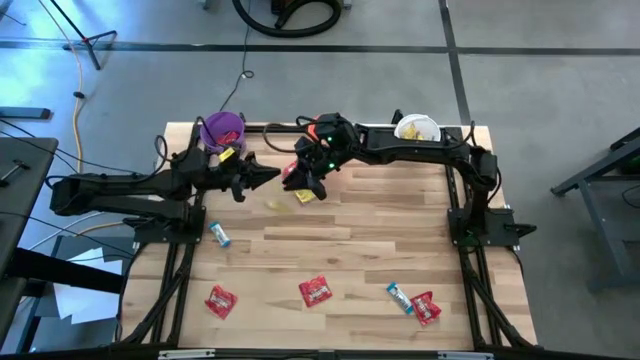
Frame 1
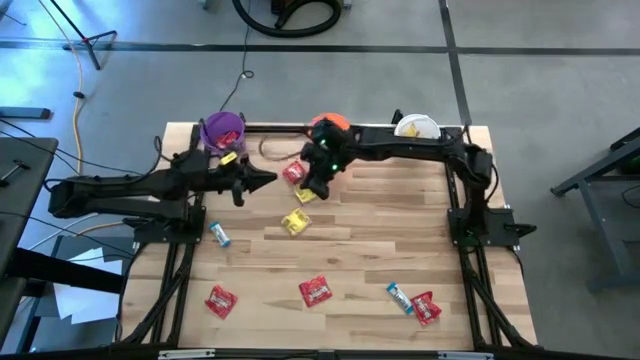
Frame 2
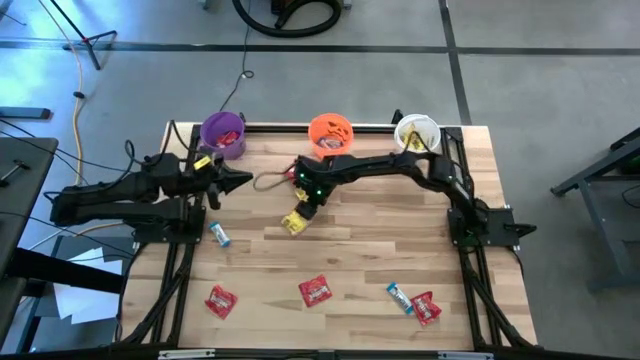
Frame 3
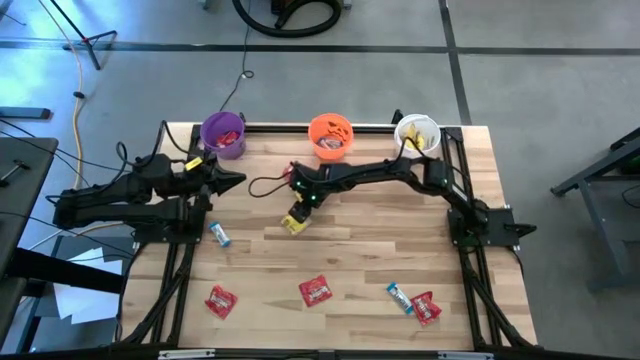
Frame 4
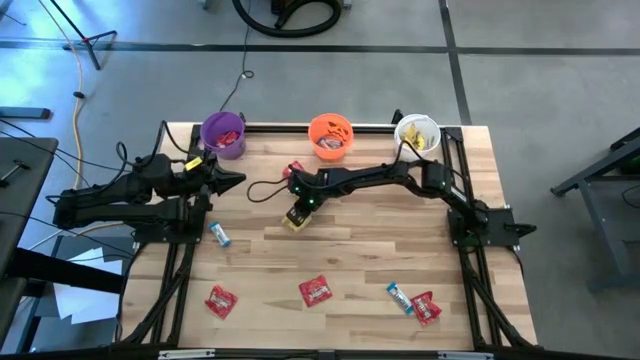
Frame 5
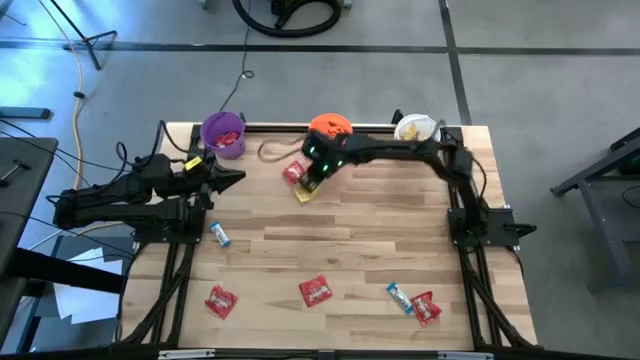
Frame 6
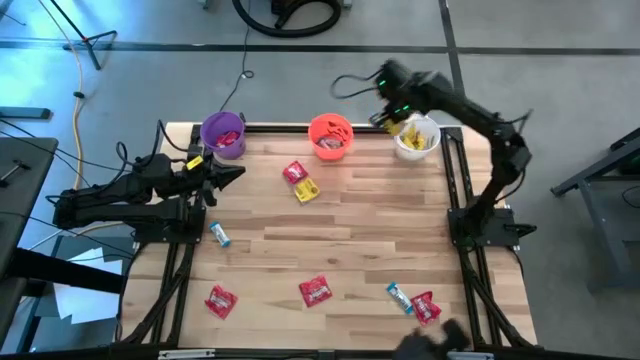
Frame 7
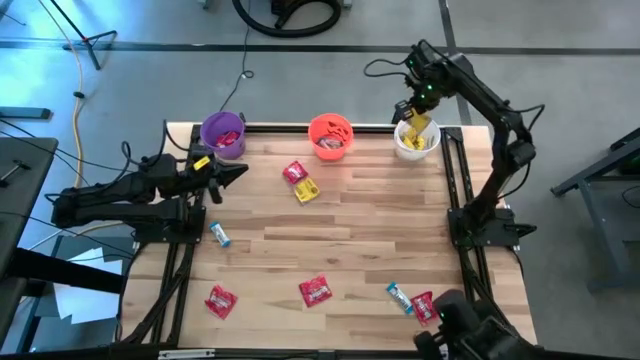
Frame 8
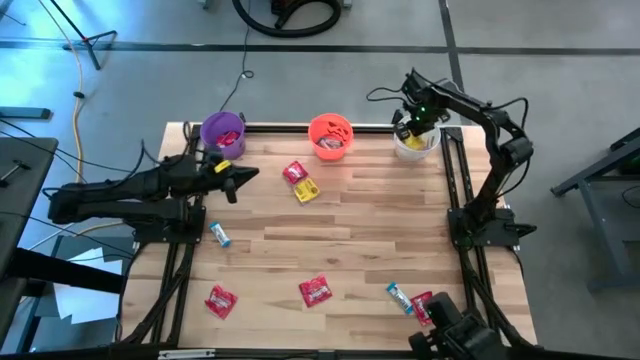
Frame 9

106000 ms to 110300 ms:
Task: Organize candy in baskets
Put the yellow candy into the white bucket

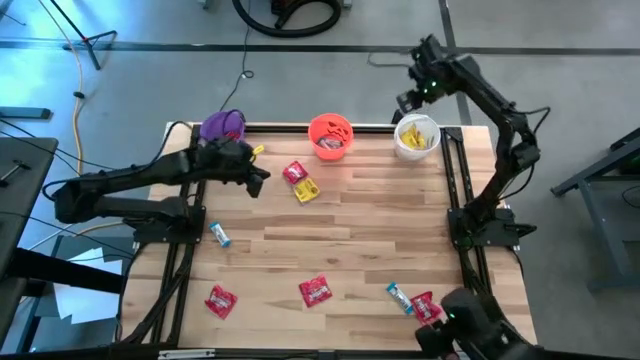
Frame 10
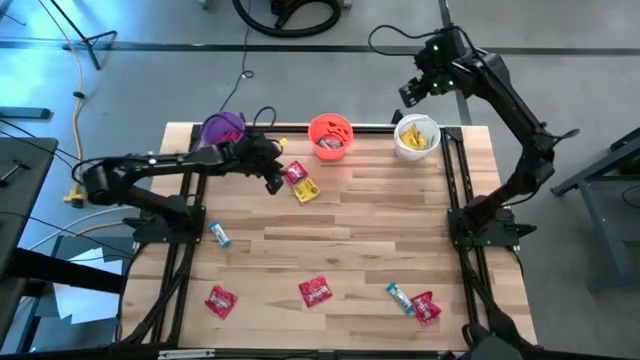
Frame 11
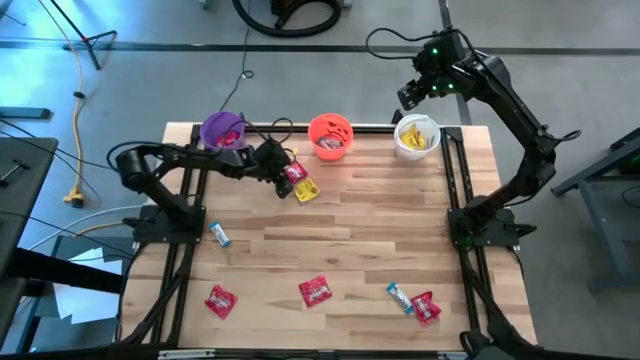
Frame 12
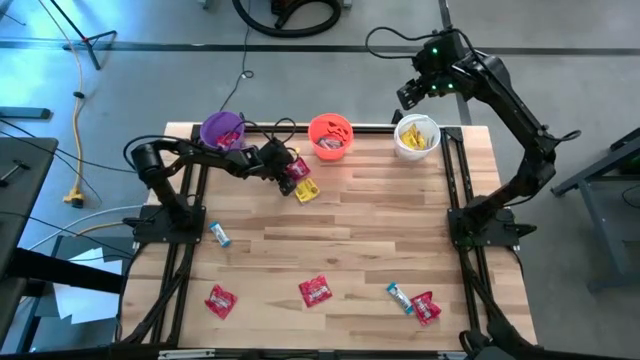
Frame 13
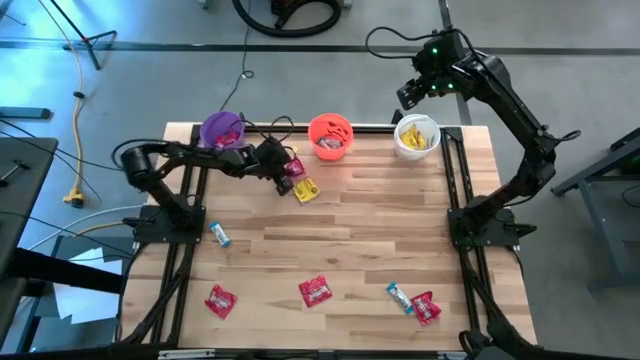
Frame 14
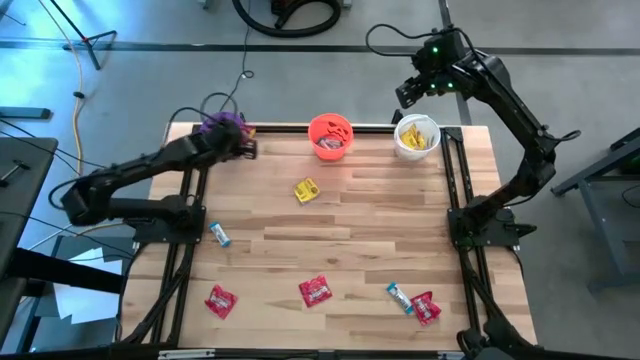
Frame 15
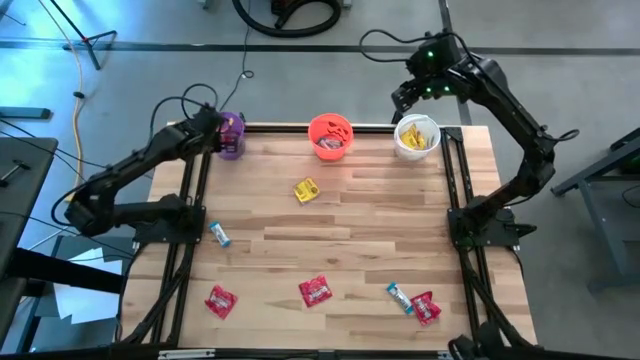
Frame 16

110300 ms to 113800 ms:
Put the red candy into the violet bucket

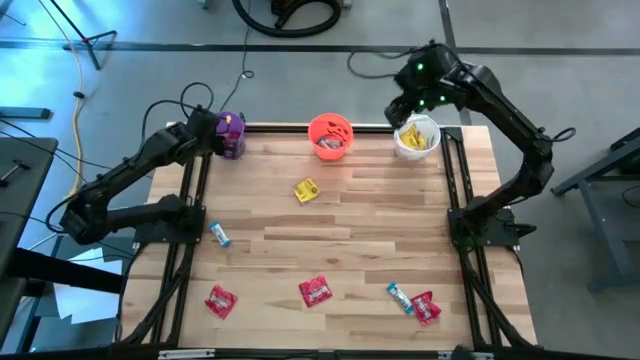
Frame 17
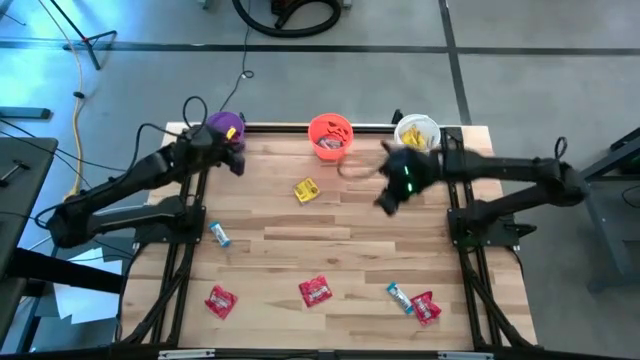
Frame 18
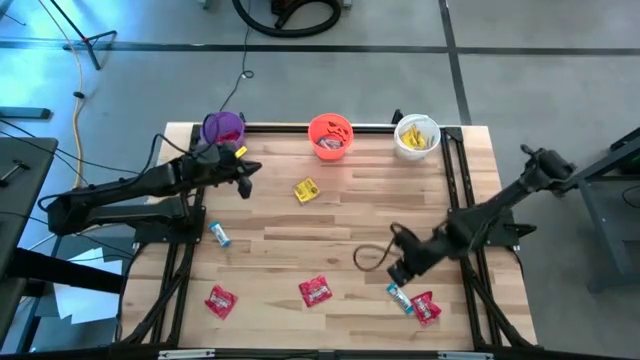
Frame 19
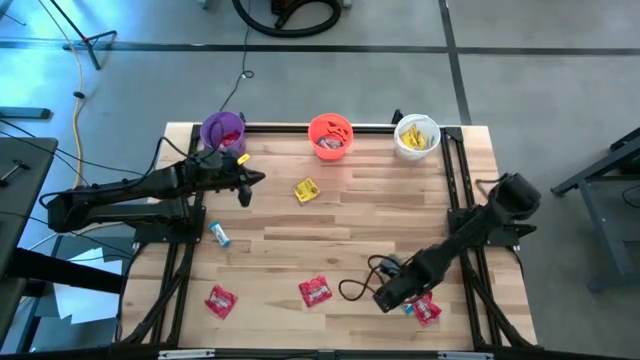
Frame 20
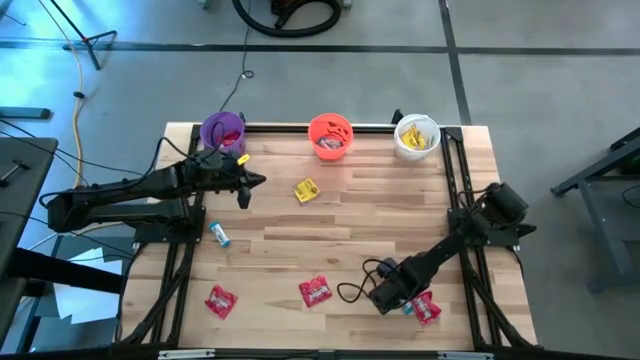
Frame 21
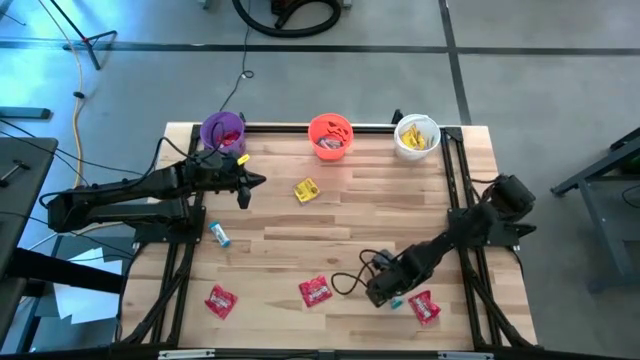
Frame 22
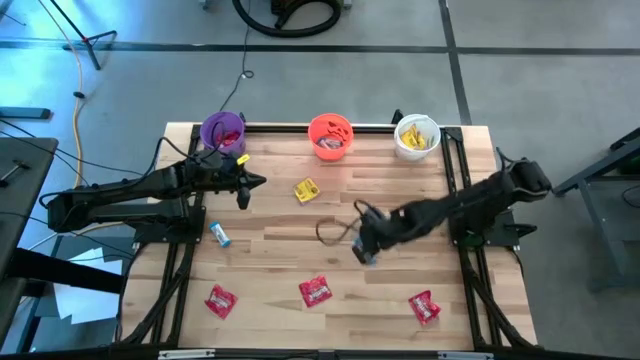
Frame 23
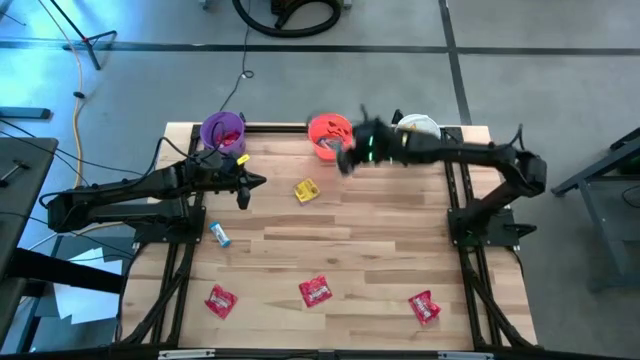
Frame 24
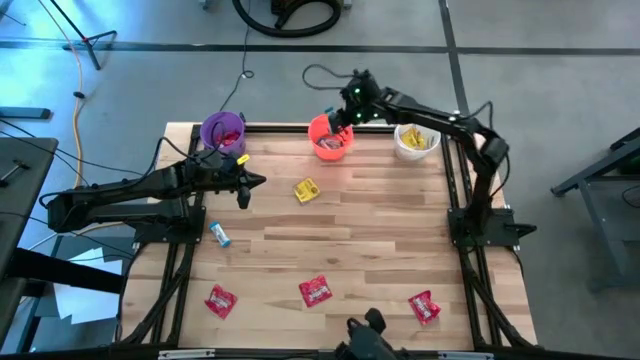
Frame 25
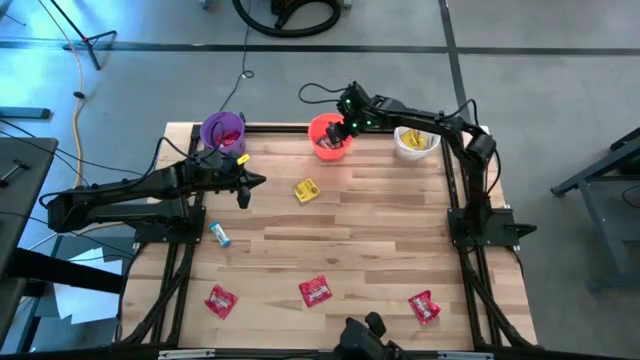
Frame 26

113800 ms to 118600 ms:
Put the white chocolate into the orange bucket

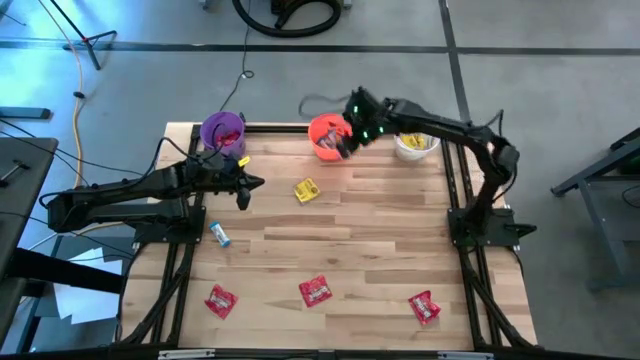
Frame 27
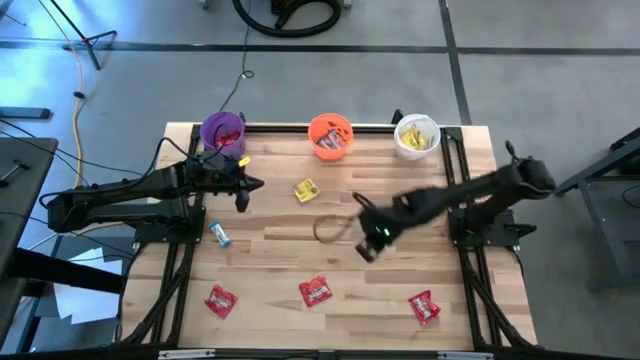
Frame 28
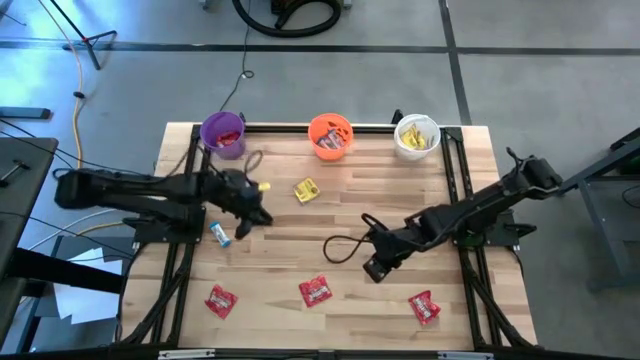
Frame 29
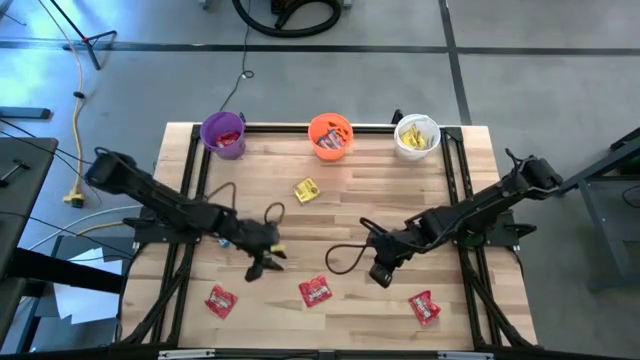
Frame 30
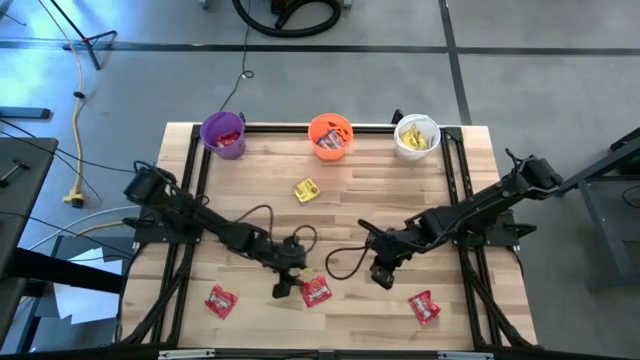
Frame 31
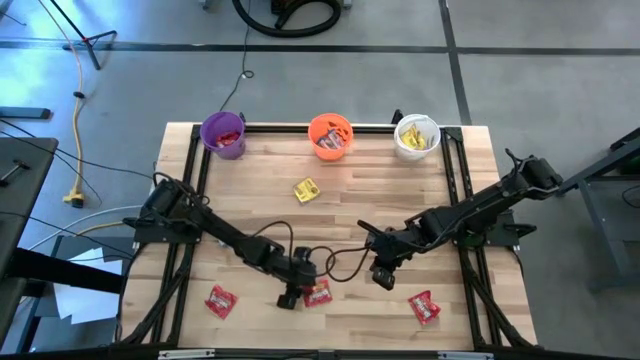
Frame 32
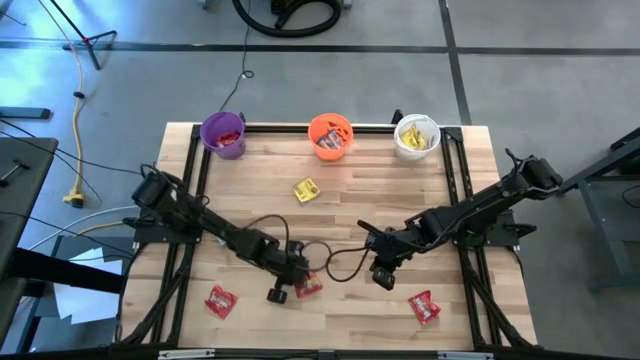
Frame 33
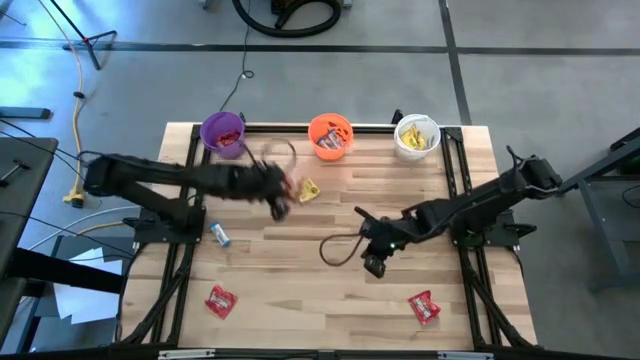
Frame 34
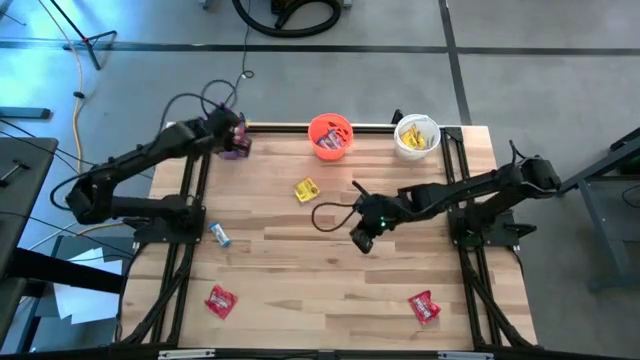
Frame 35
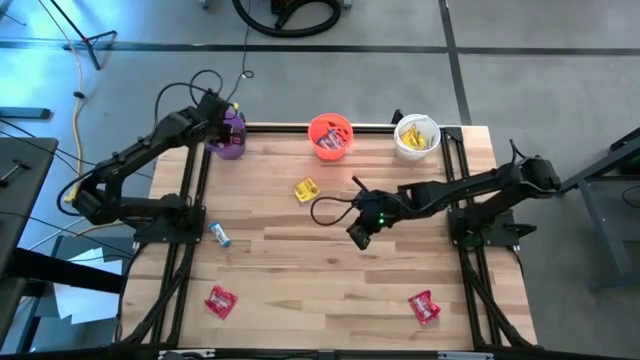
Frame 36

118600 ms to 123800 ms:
Put the red candy into the violet bucket

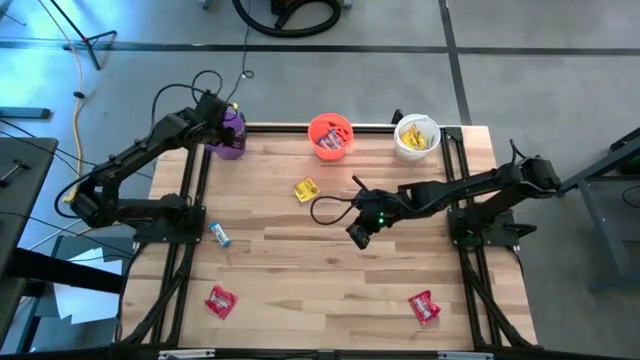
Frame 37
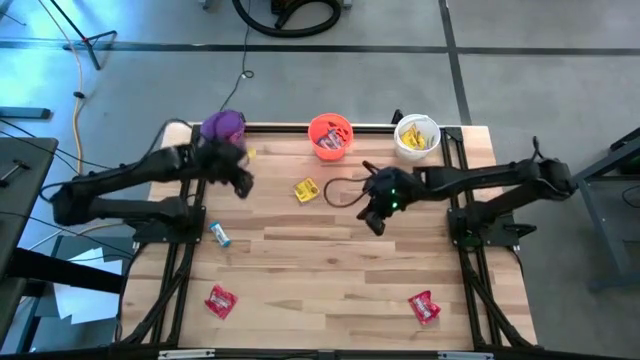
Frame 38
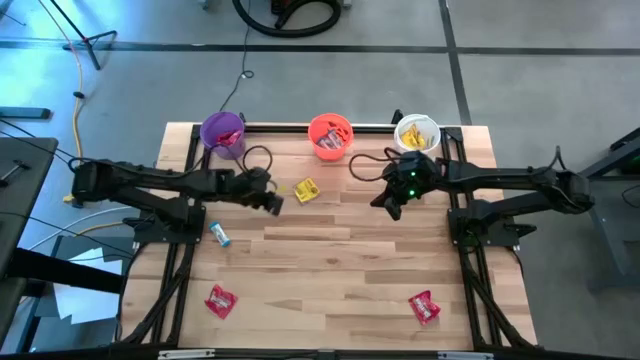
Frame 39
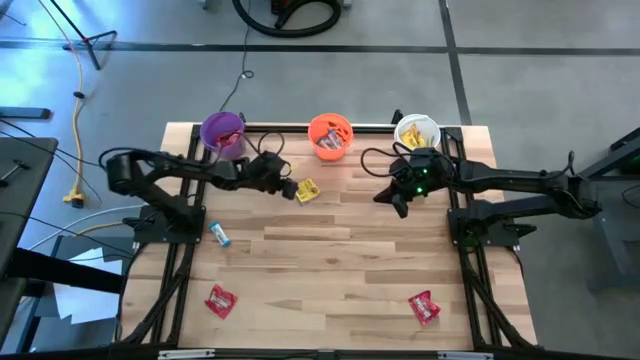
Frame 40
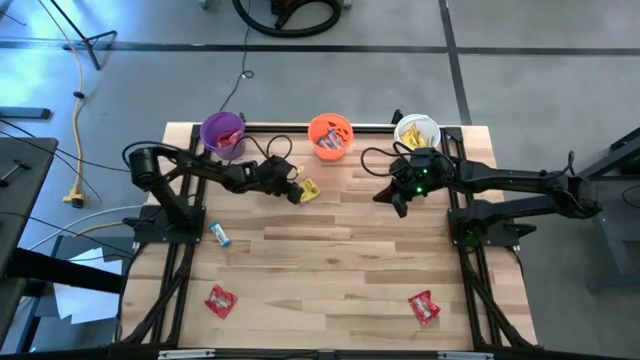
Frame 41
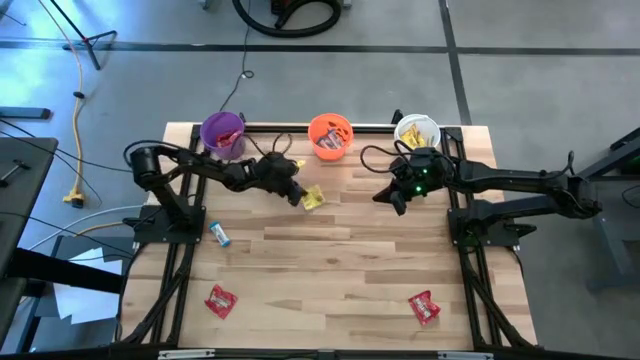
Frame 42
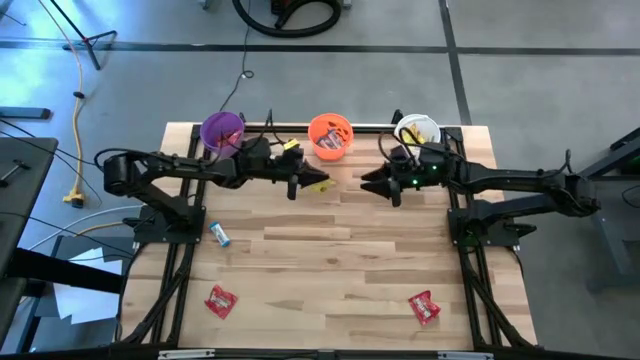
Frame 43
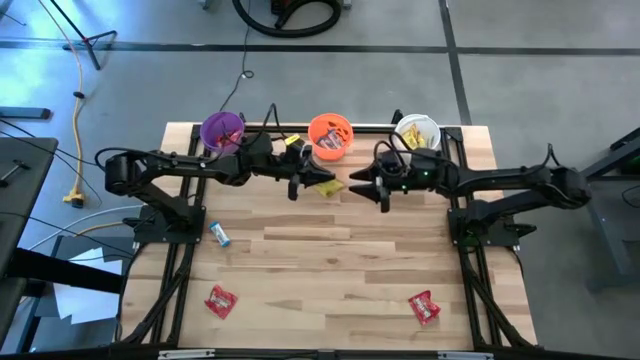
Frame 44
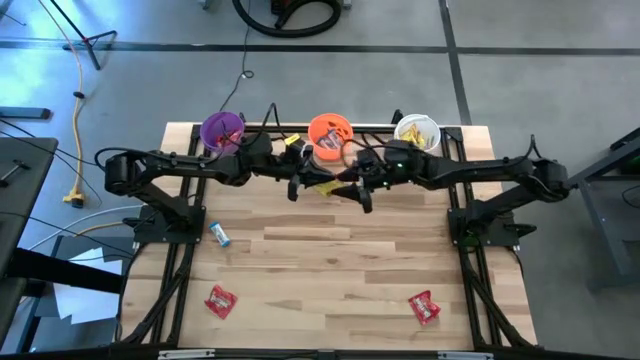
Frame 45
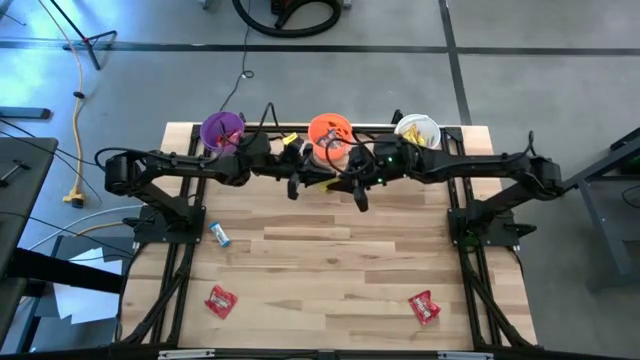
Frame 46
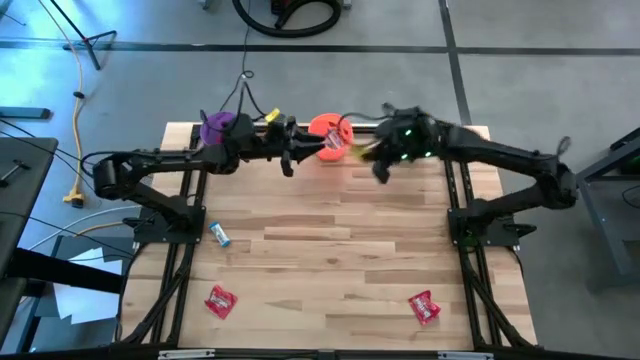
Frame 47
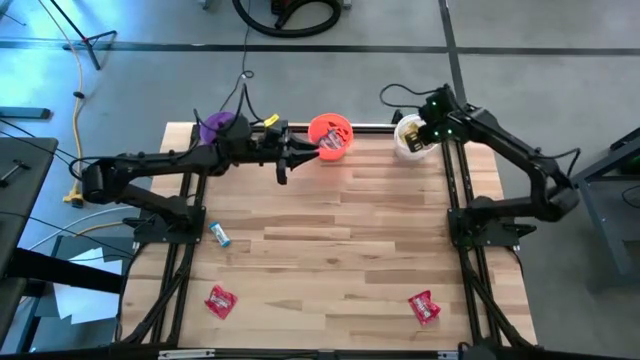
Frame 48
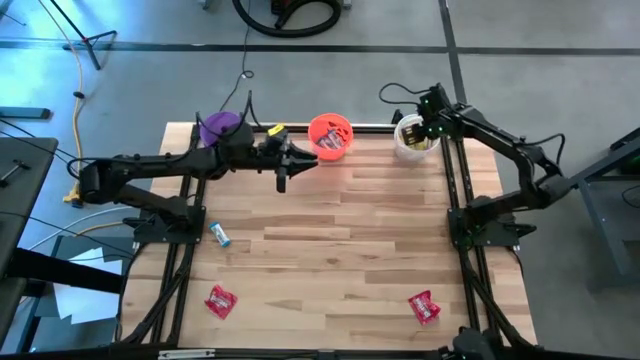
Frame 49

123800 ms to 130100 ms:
Put the yellow candy into the white bucket
